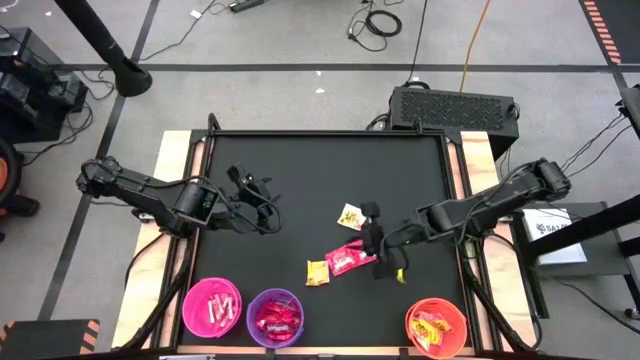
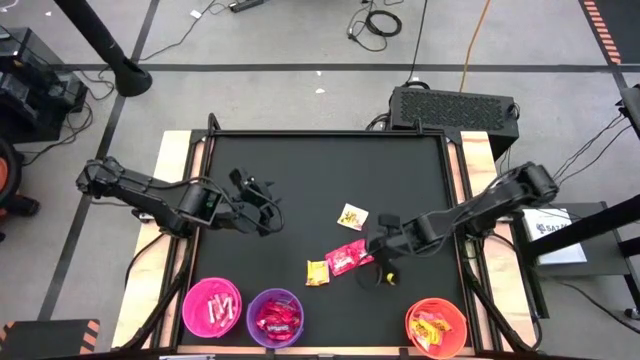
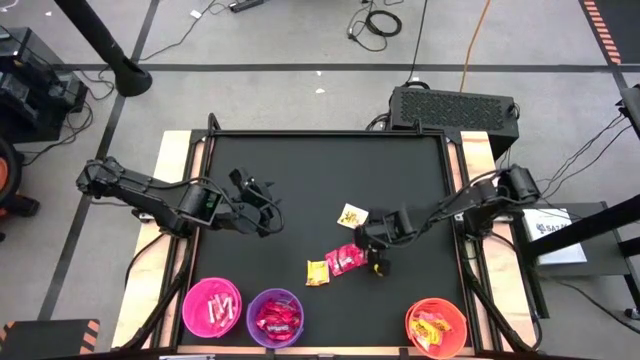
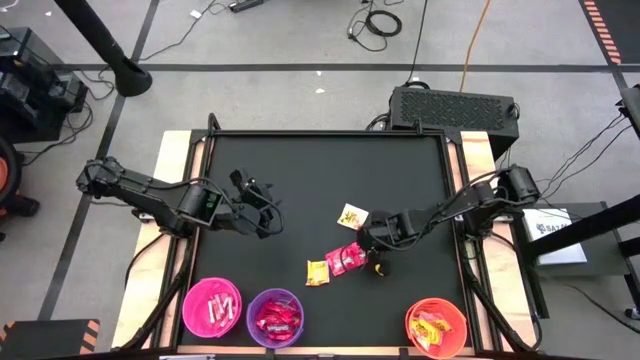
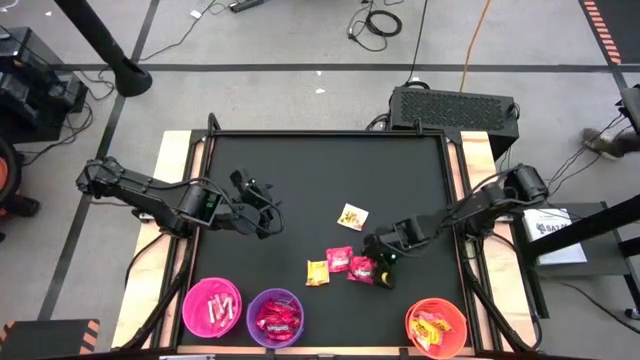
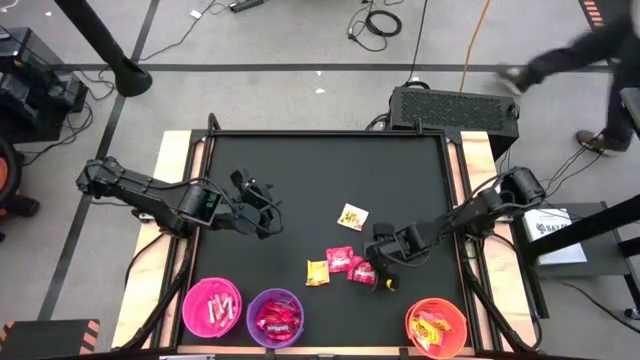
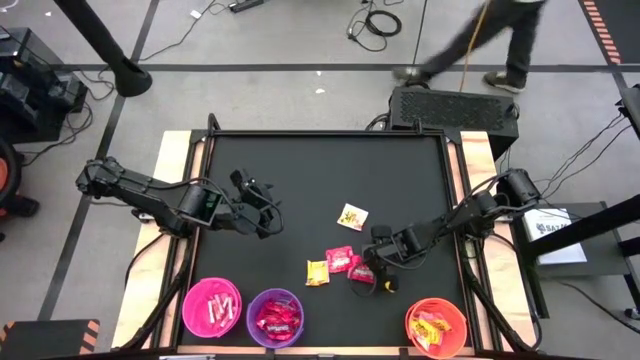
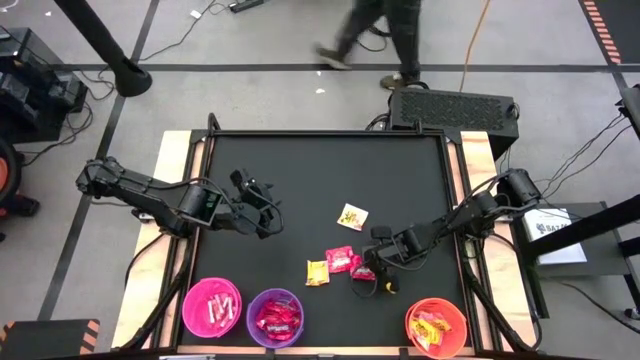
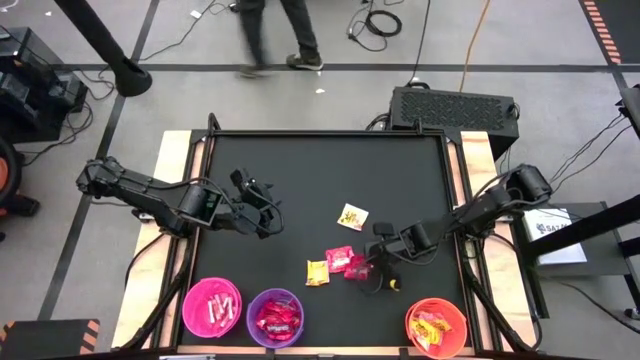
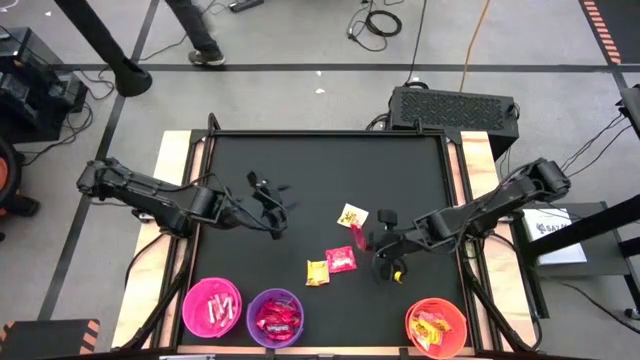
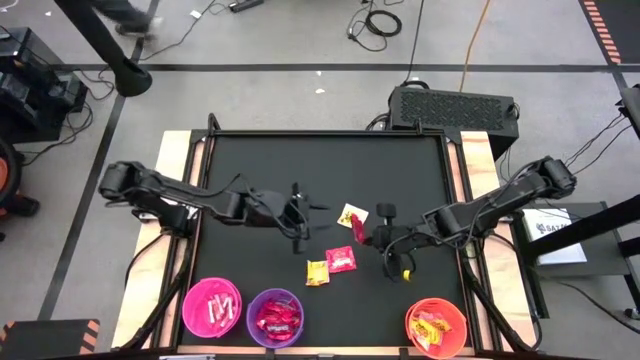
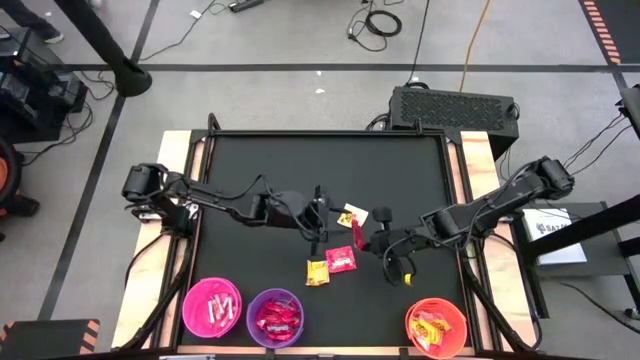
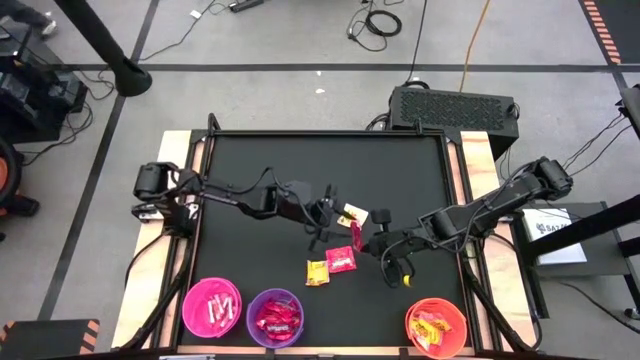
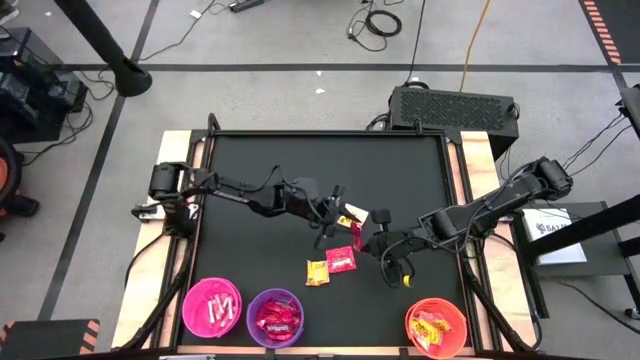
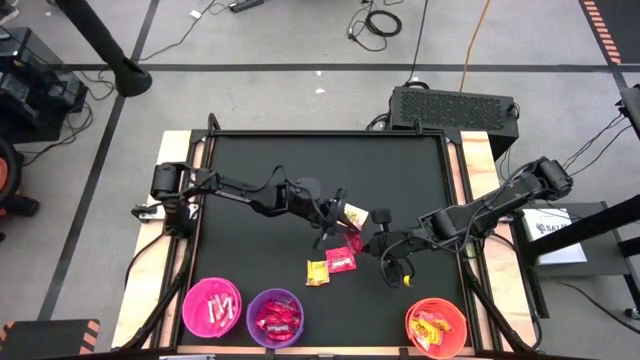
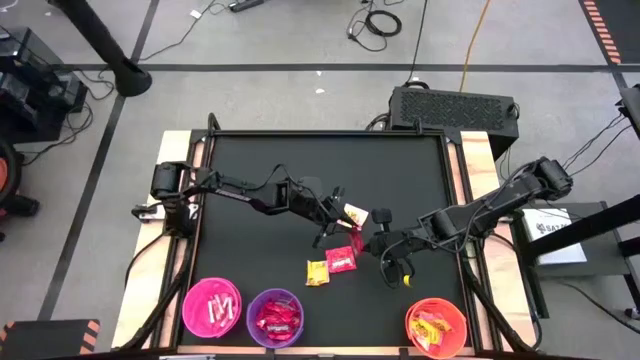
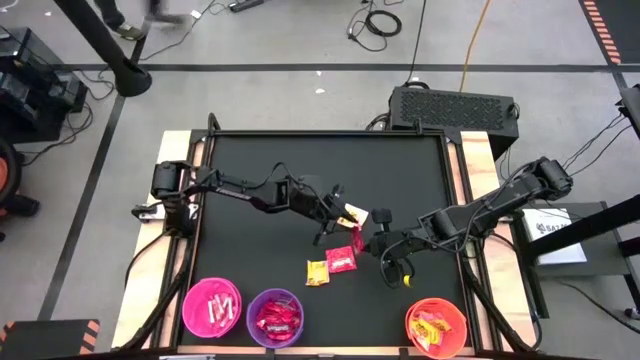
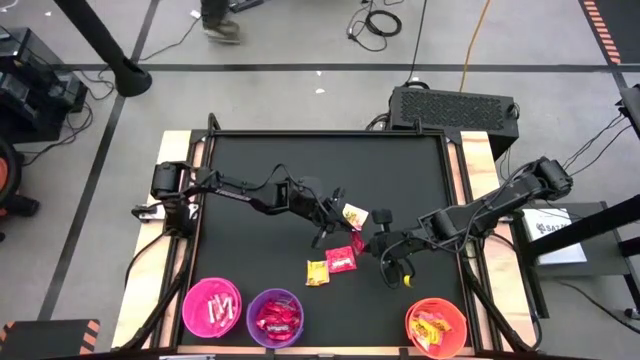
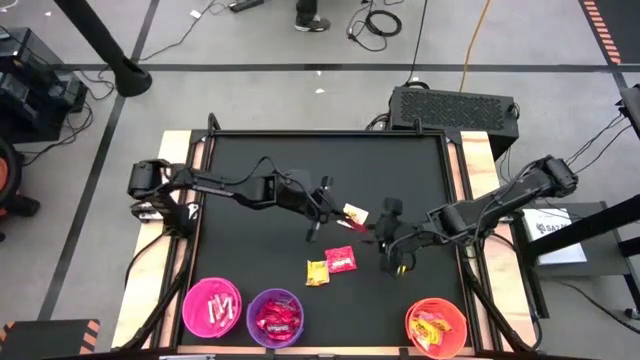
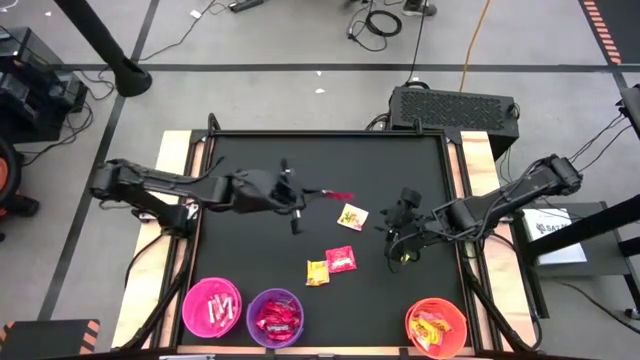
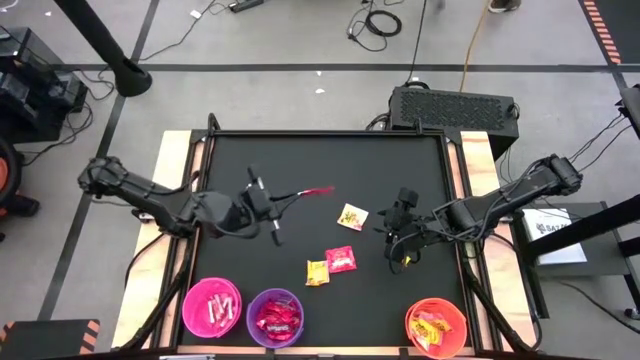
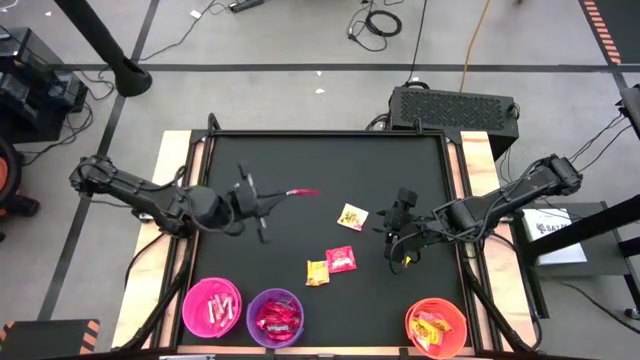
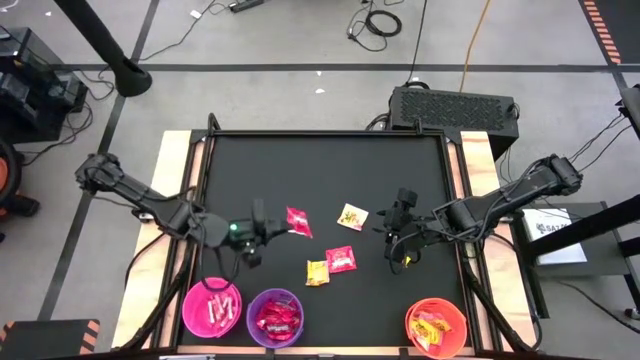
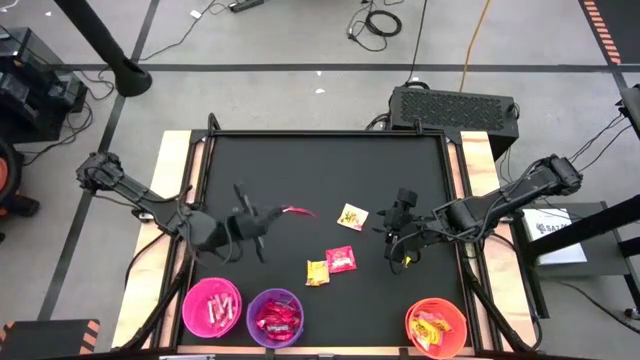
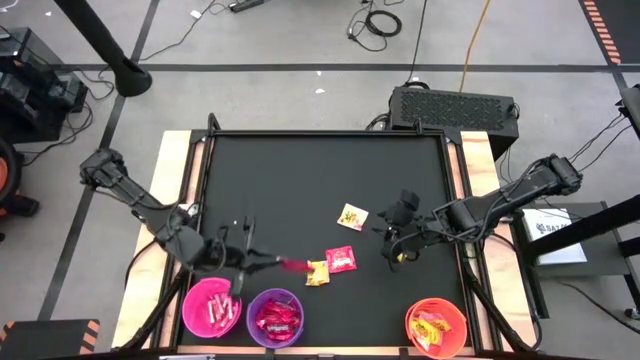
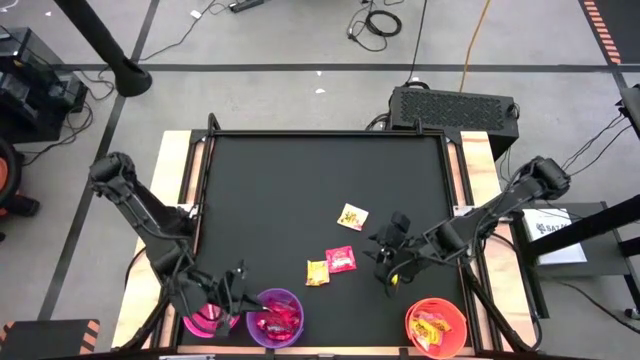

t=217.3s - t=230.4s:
Task: Sort candy by brand, put in halloween buckets
Put the red candy into the violet bucket

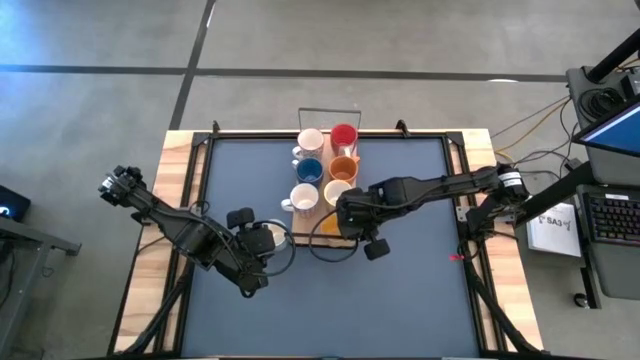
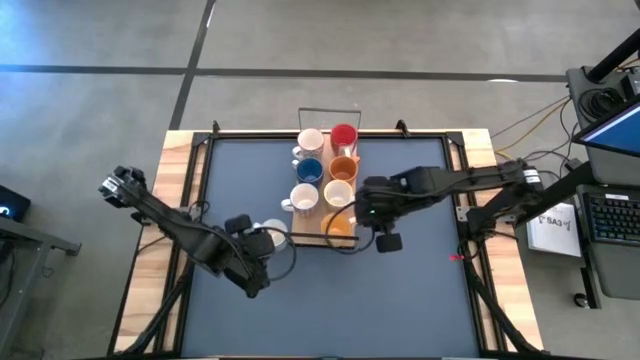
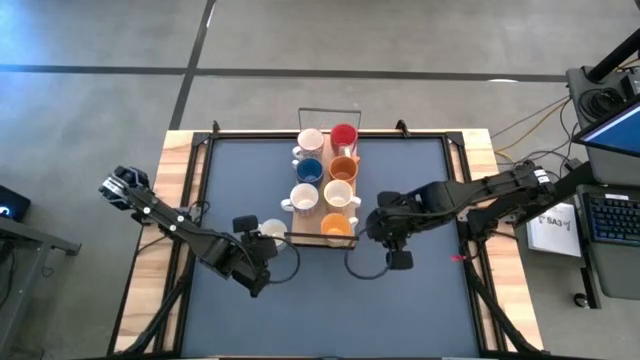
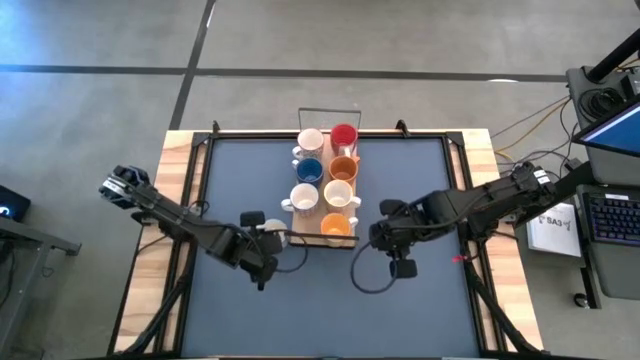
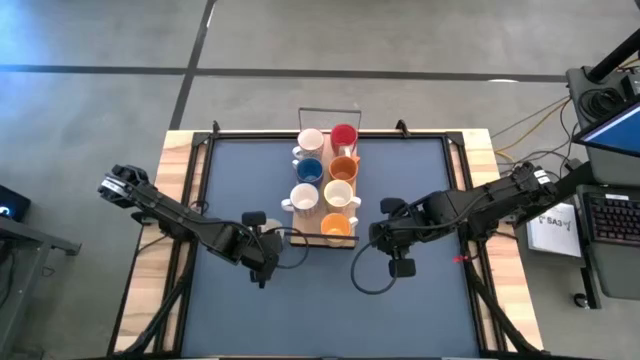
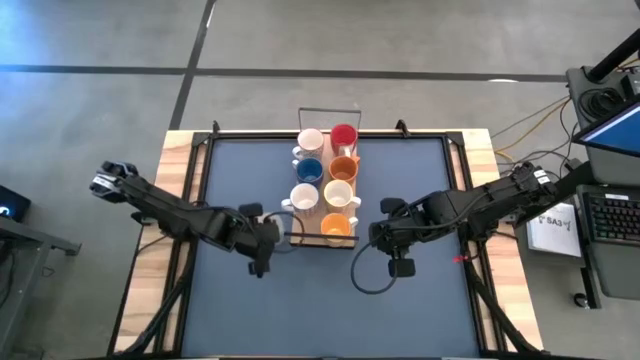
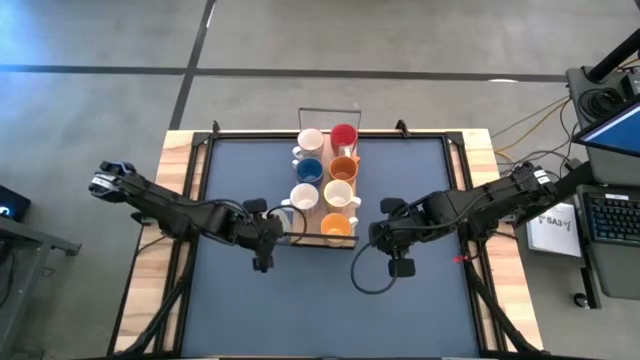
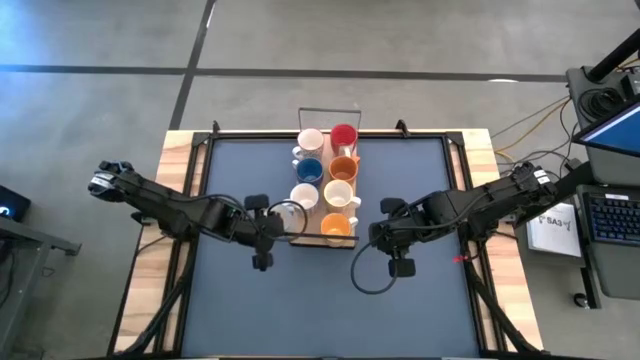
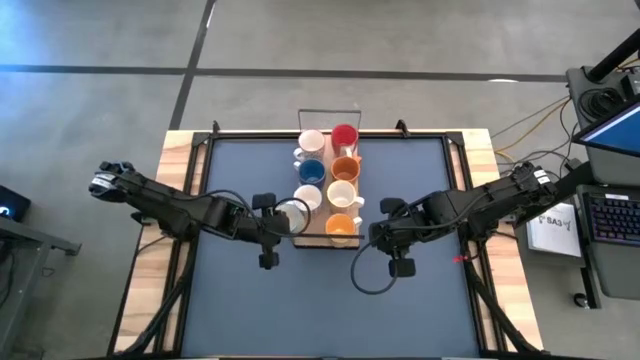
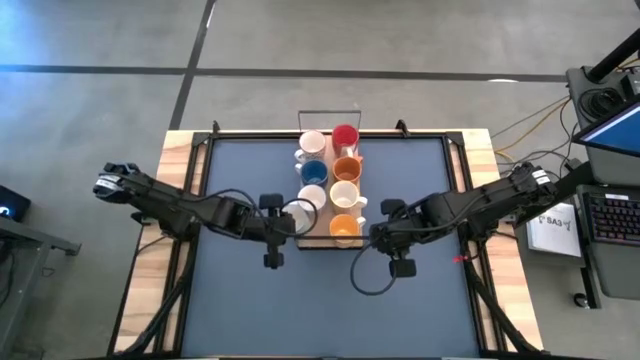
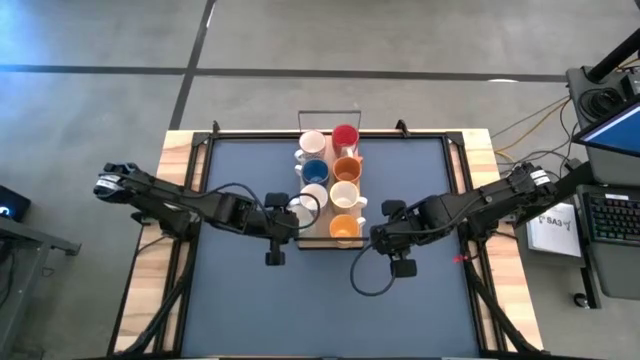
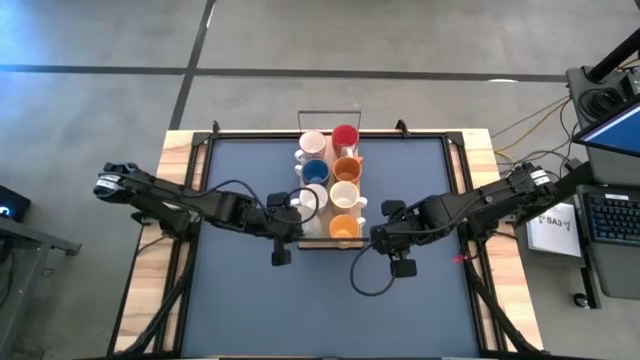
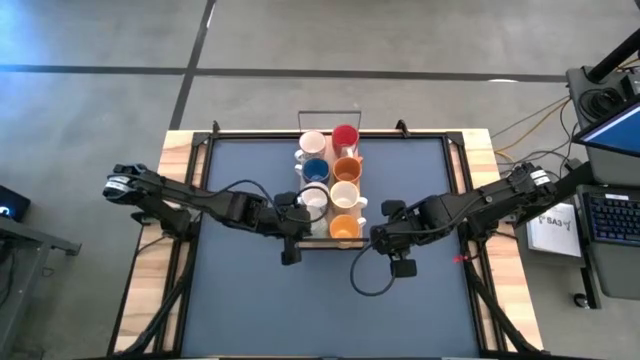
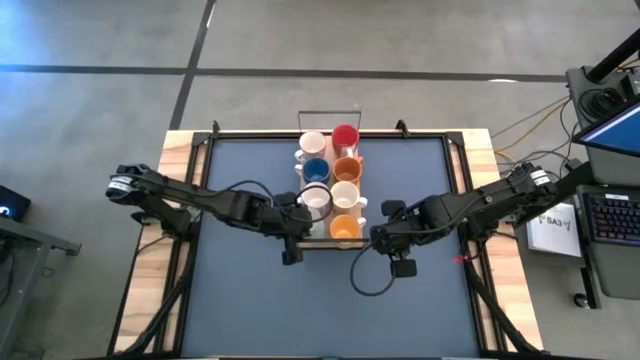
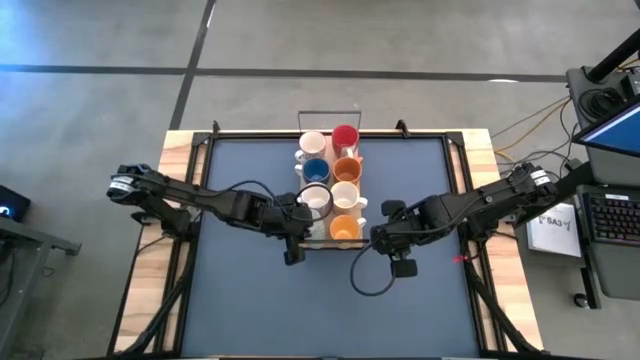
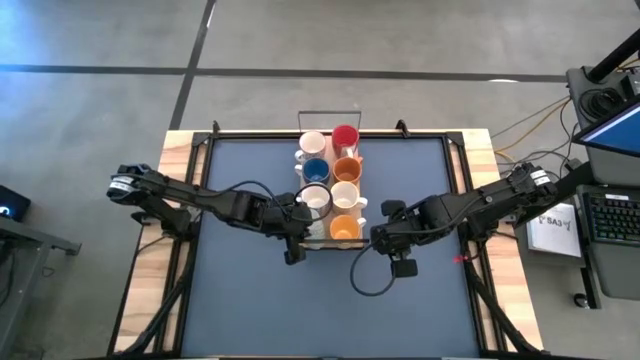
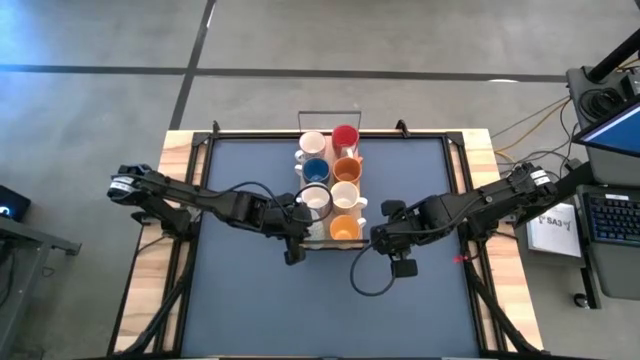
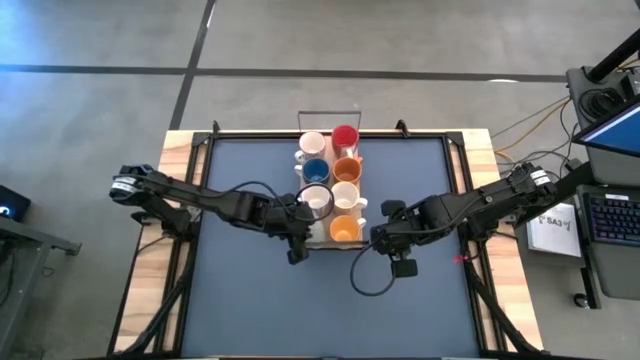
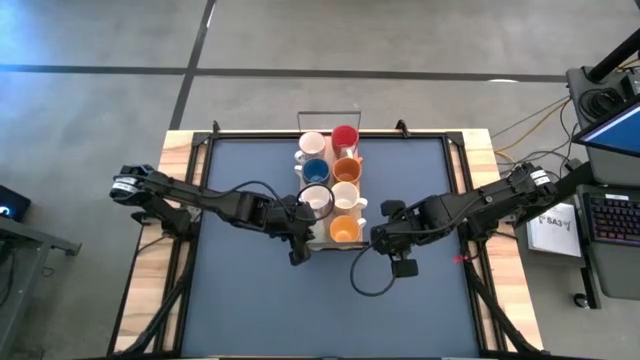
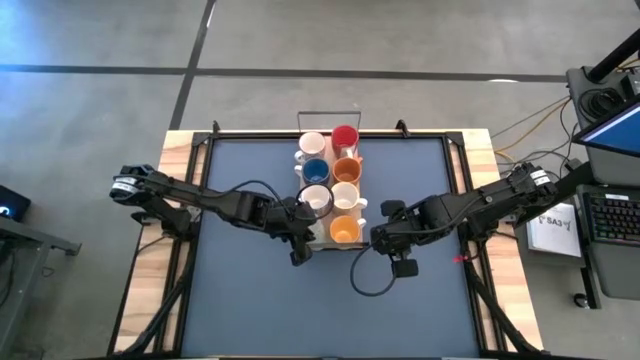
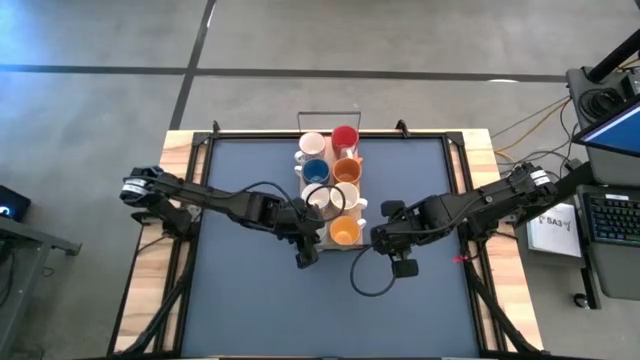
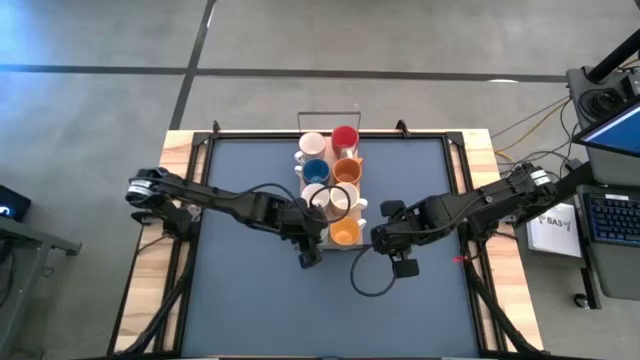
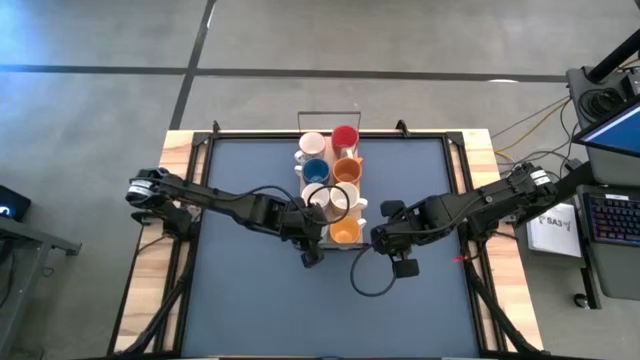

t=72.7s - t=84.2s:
Task: Place coffee mugs
Put the green mug on the shelf
